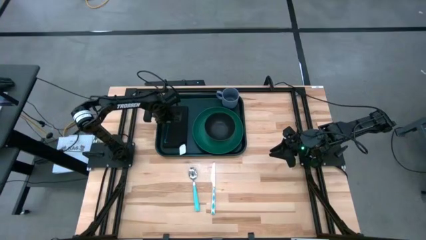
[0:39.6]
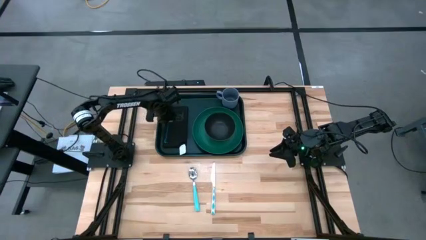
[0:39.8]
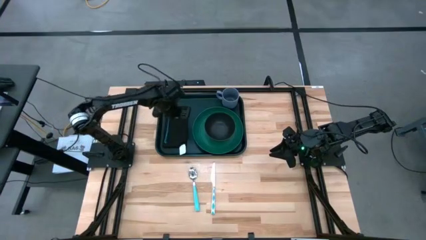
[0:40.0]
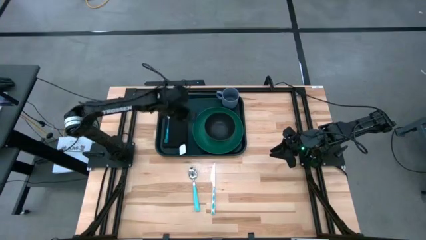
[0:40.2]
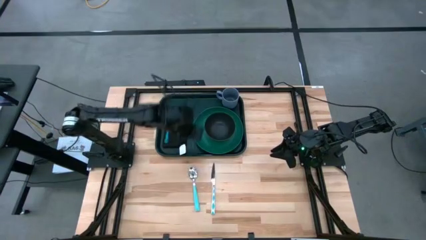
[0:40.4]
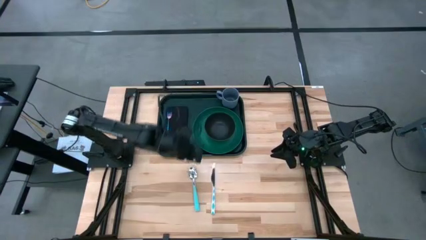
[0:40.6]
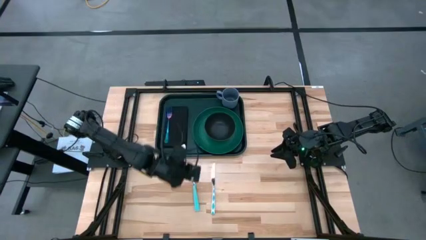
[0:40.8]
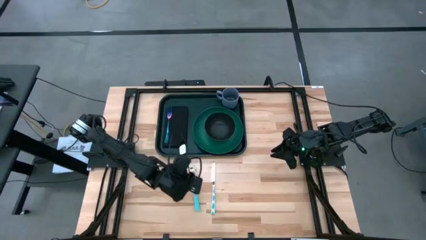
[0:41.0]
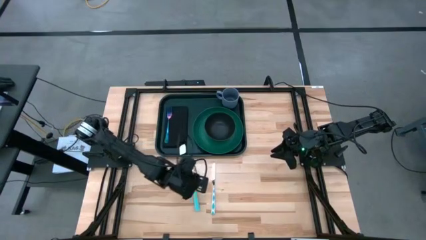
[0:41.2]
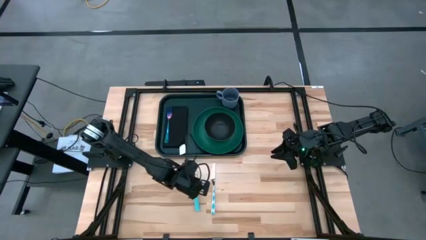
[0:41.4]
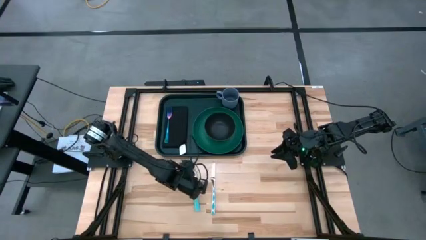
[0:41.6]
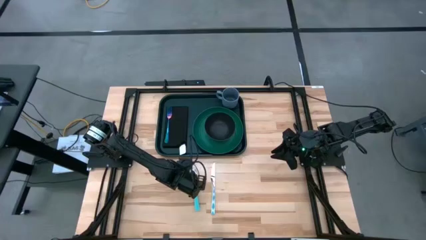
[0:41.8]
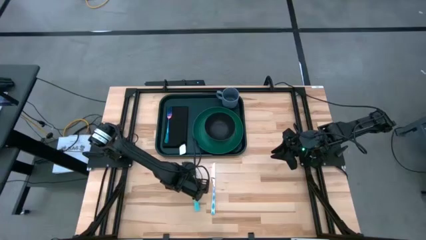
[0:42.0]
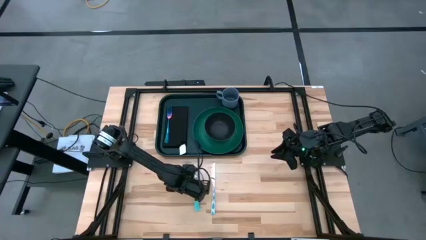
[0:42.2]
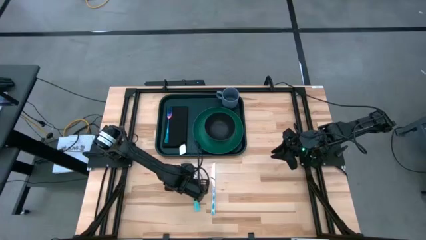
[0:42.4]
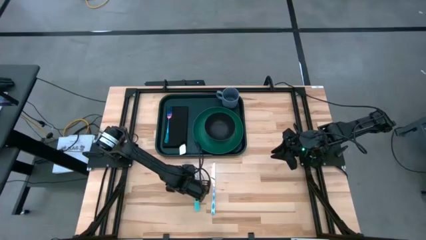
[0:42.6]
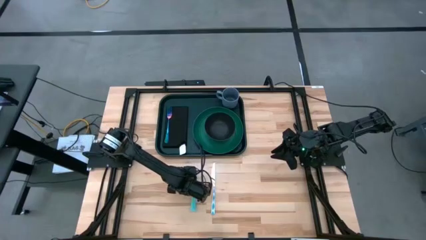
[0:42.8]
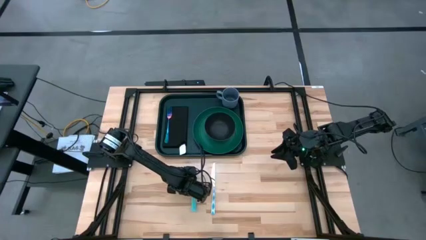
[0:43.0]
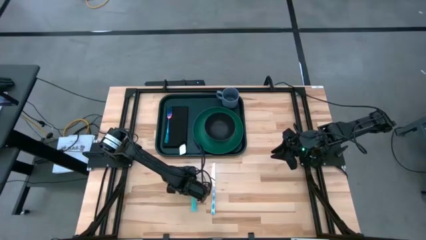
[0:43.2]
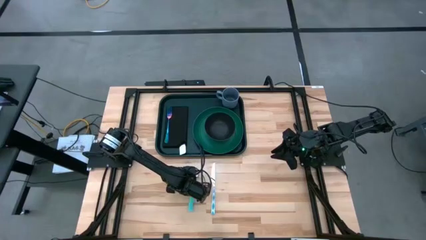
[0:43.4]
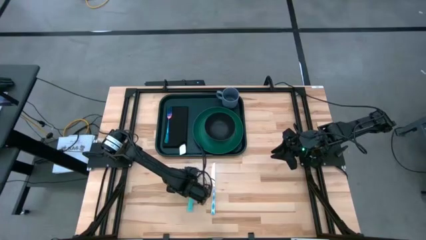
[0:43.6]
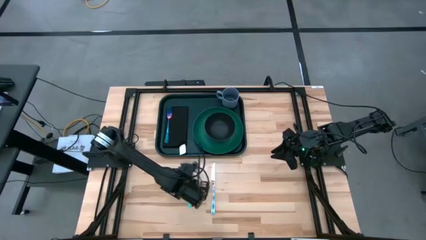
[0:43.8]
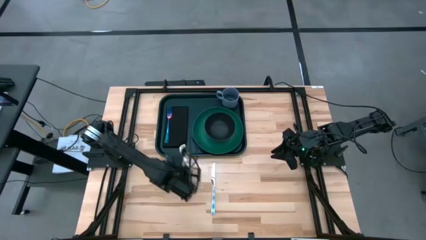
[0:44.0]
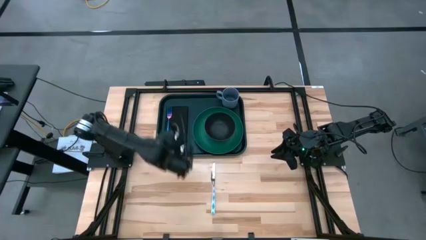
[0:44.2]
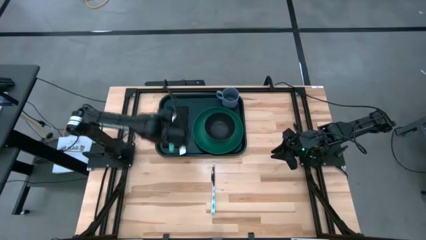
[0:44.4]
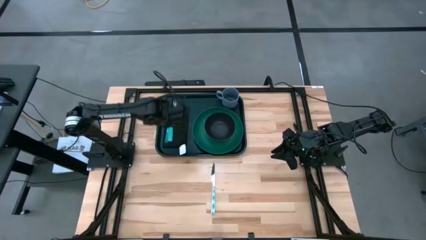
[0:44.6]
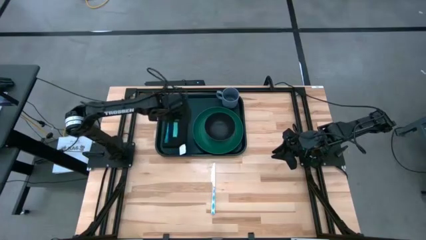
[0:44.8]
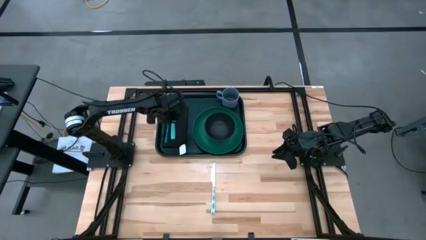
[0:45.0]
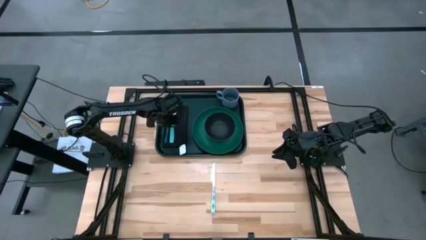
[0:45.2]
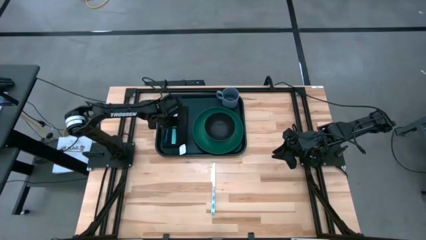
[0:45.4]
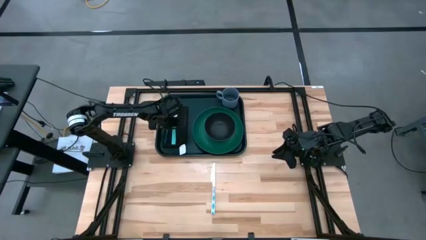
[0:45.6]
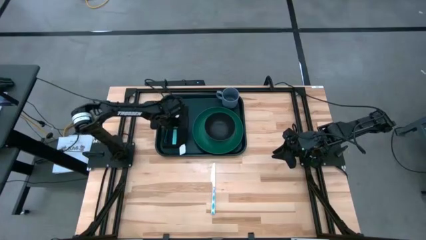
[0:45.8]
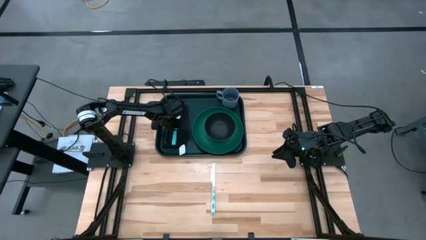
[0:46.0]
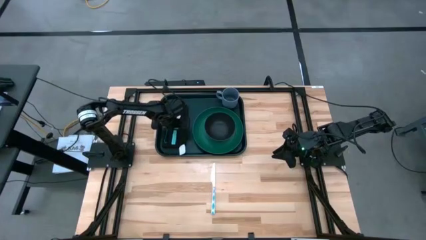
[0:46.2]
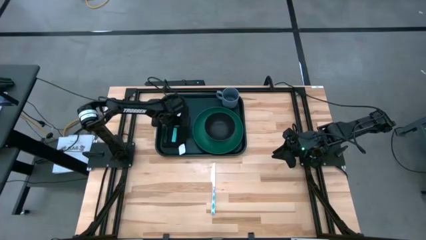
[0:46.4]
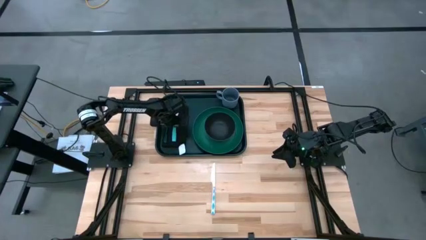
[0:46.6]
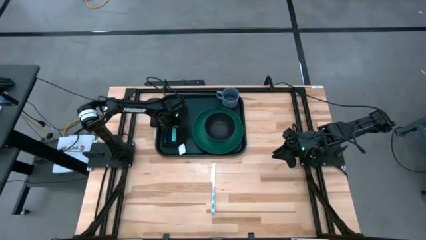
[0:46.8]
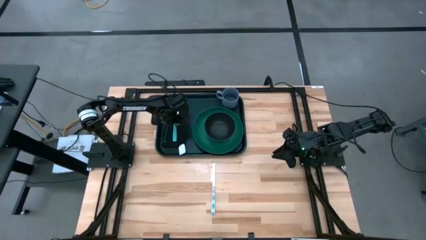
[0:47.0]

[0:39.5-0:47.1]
Task: Set up tray
Put the blue spoon to the right of the blue fork on the black napkin on the dark serving tray

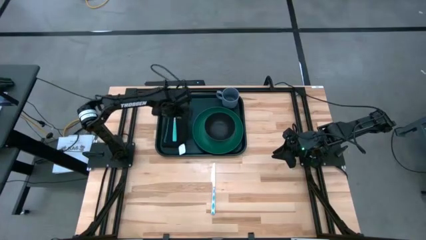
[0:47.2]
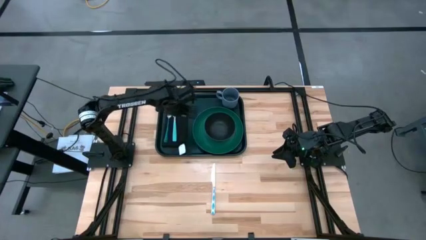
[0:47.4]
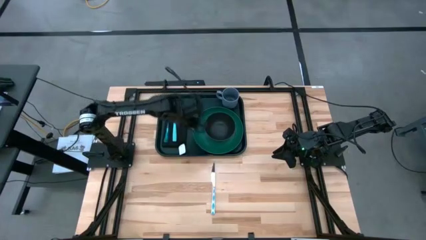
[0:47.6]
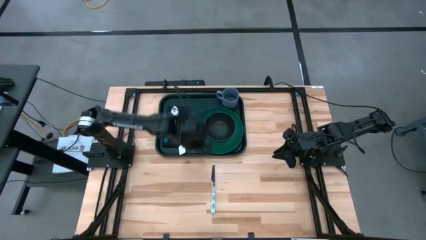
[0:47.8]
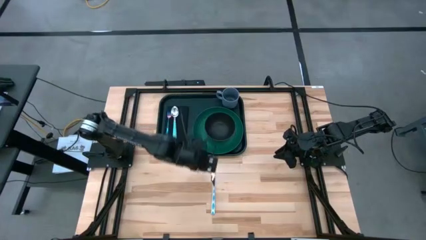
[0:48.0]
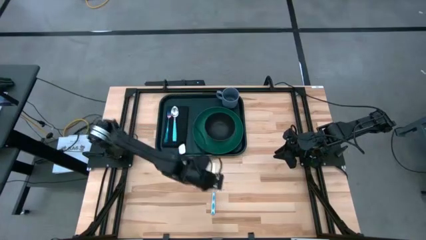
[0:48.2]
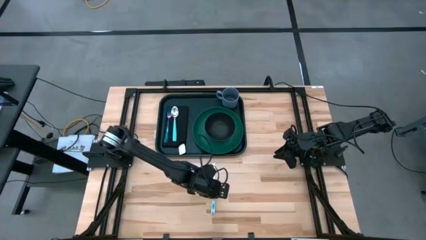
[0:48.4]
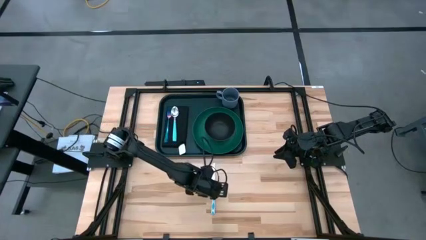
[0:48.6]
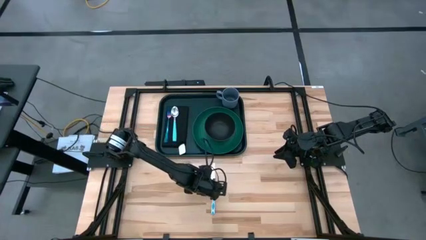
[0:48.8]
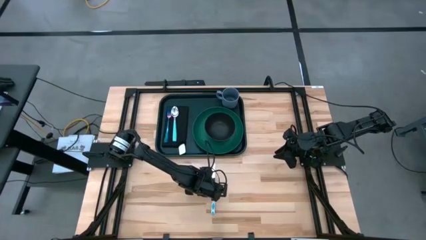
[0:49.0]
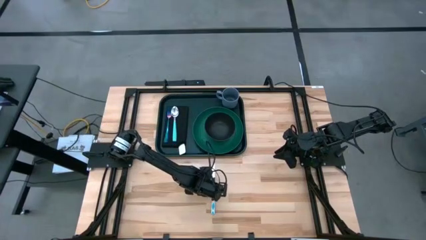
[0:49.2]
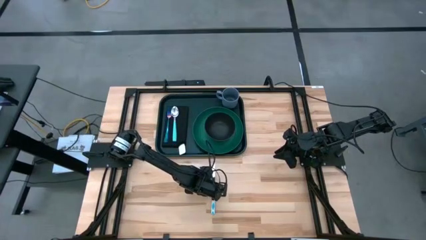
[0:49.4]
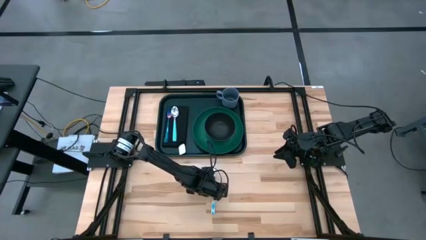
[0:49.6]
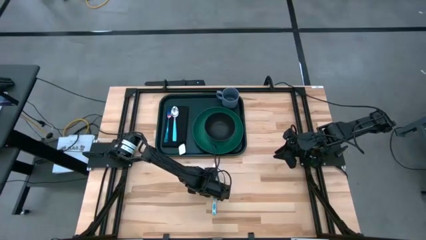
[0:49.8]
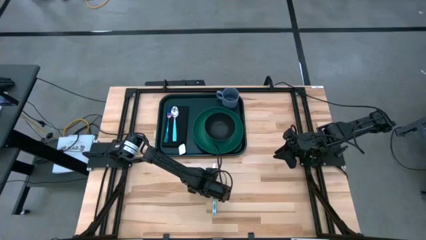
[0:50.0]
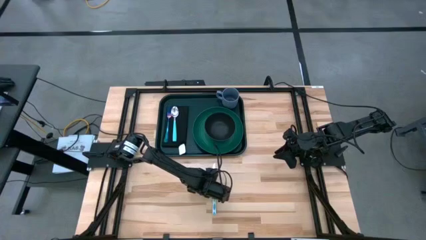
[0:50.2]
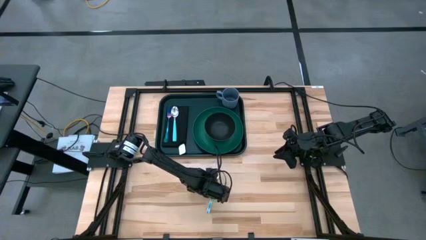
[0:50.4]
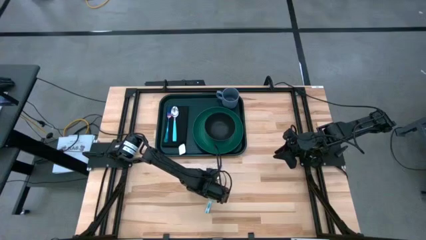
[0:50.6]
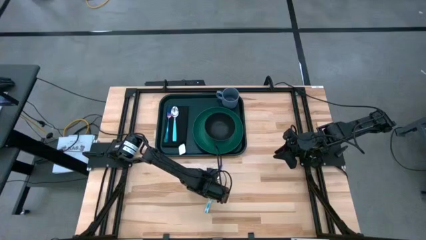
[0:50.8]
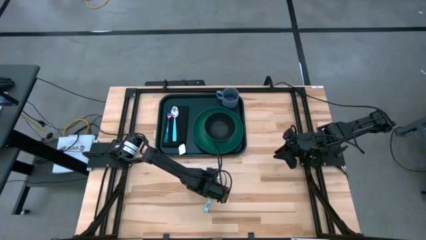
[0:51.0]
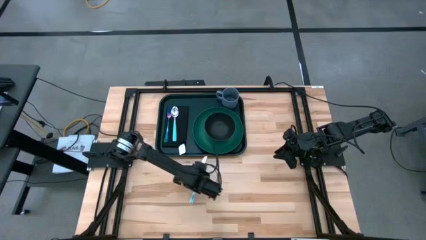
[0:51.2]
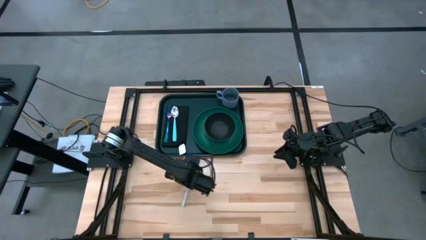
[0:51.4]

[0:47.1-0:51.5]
Put the blue patterned knife to the right of the blue spoon on the black napkin on the dark green serving tray

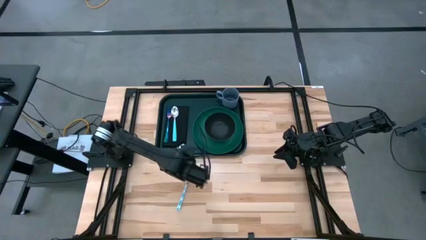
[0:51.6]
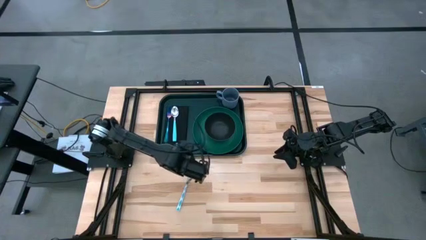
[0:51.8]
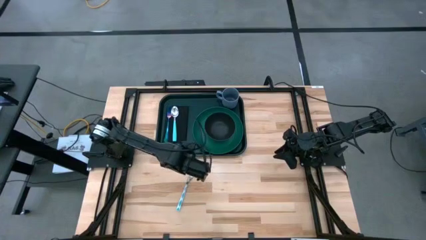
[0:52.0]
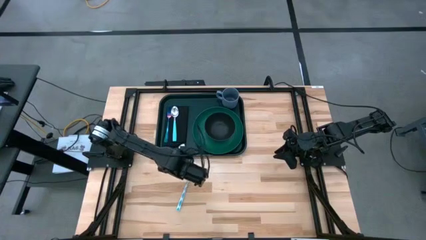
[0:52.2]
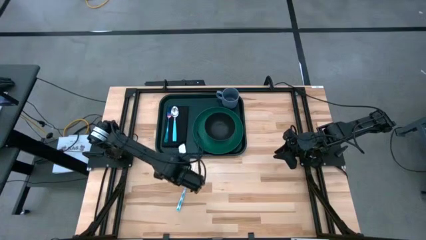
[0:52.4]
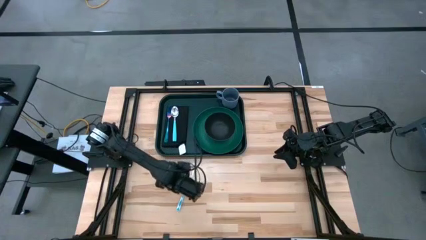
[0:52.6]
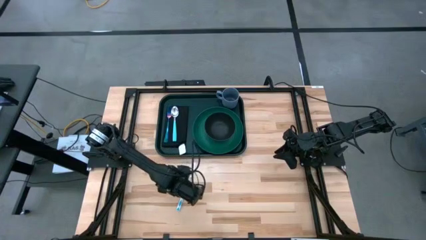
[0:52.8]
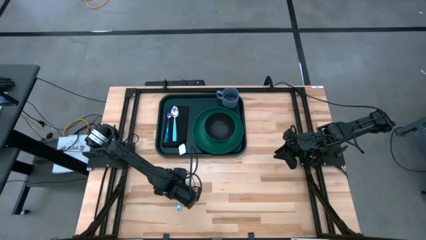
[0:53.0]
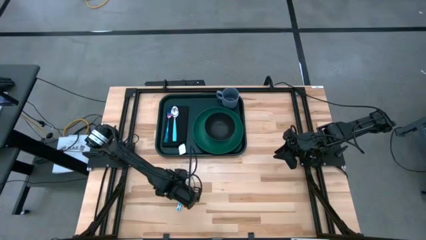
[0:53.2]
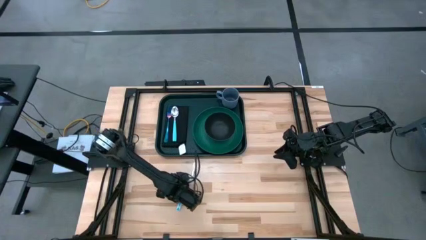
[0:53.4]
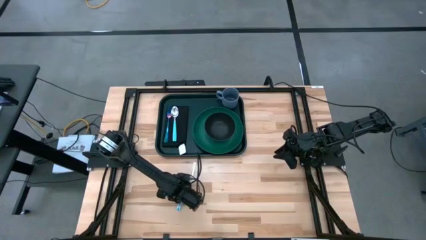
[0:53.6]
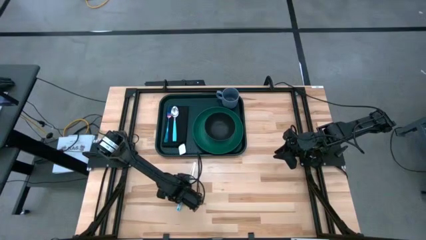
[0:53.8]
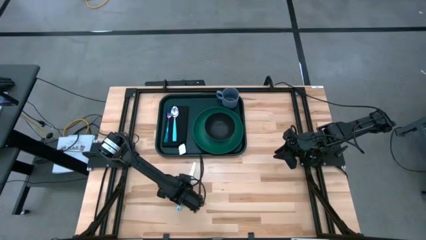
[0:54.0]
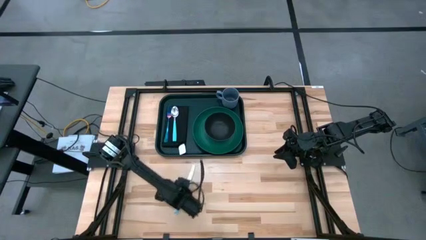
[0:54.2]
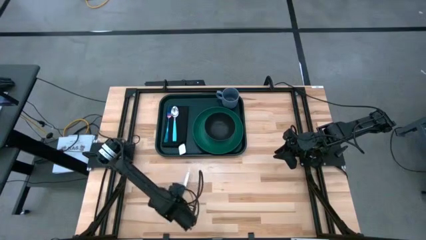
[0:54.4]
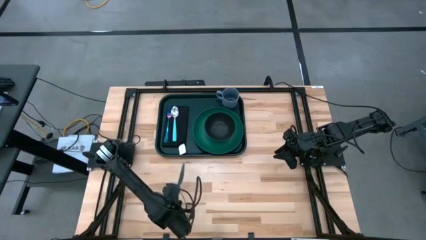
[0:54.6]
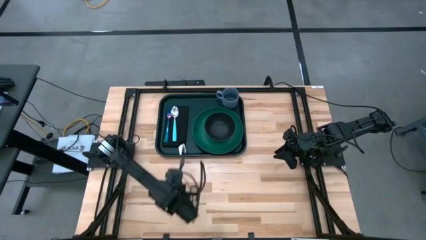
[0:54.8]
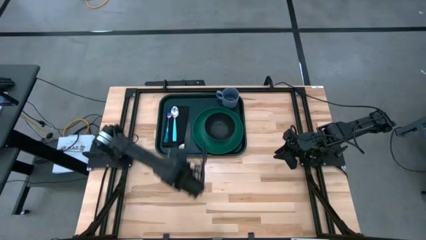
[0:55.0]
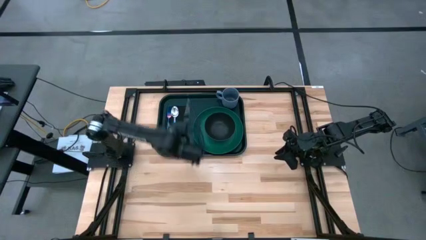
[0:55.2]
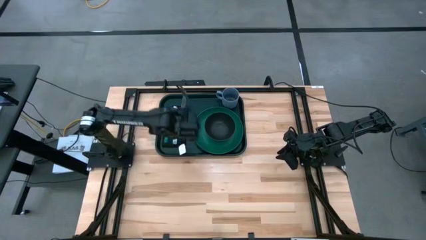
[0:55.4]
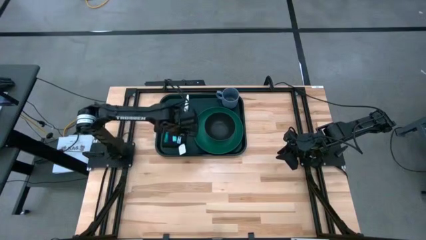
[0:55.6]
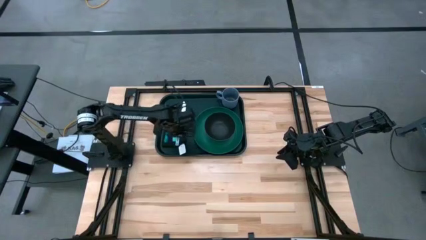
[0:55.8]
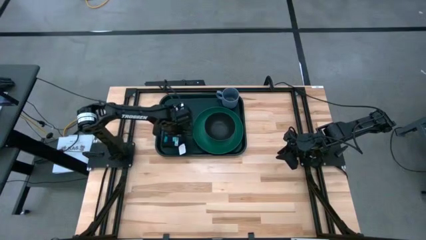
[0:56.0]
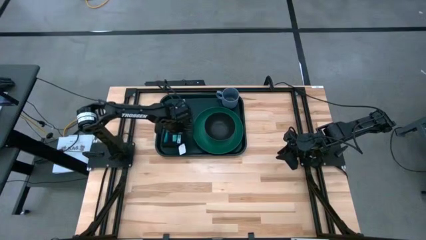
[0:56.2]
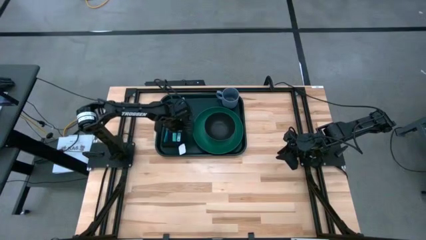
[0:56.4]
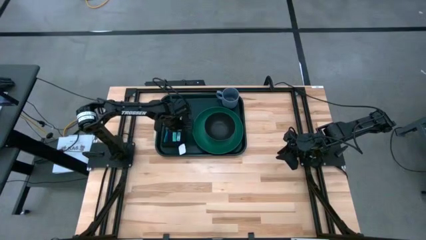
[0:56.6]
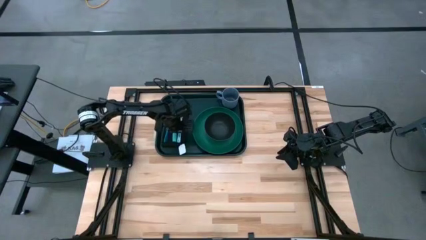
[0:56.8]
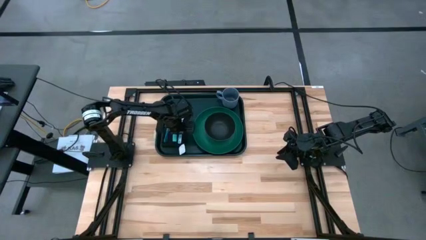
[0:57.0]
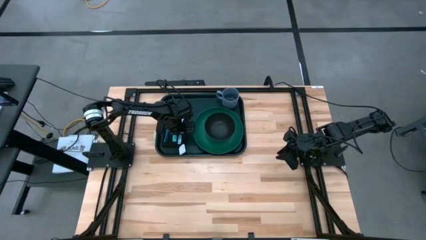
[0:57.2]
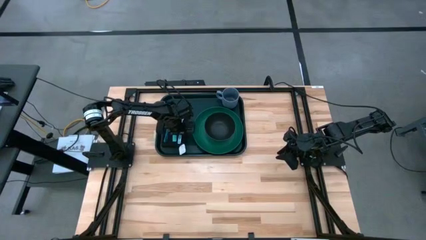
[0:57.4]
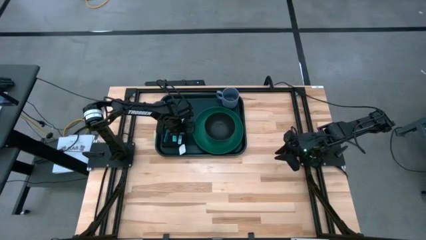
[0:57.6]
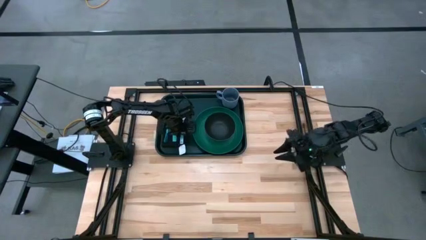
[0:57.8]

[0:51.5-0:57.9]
Put the blue patterned knife to the right of the blue spoon on the black napkin on the dark green serving tray
